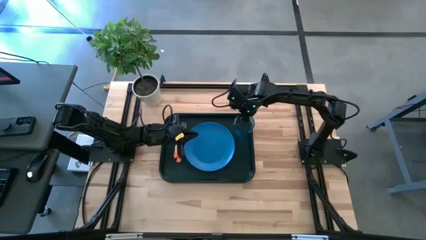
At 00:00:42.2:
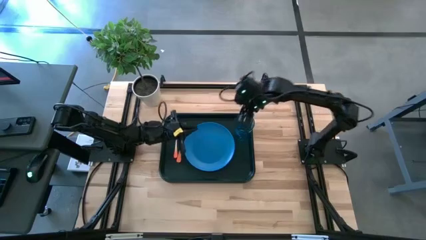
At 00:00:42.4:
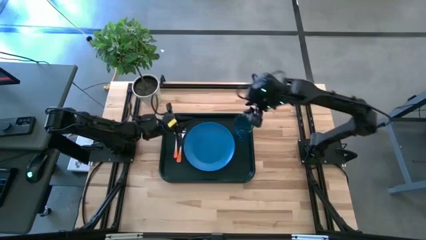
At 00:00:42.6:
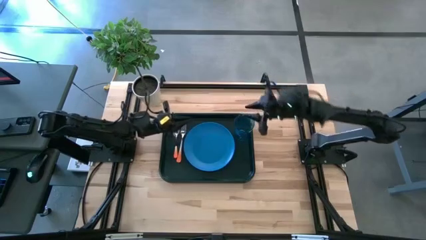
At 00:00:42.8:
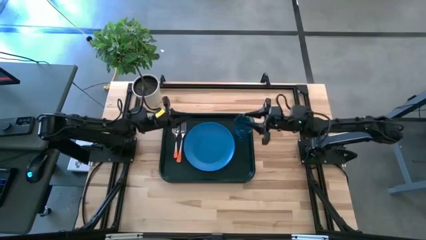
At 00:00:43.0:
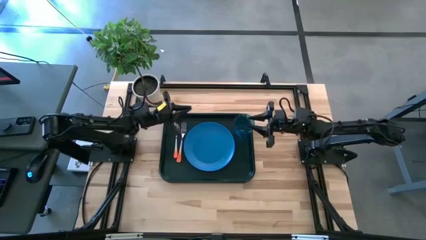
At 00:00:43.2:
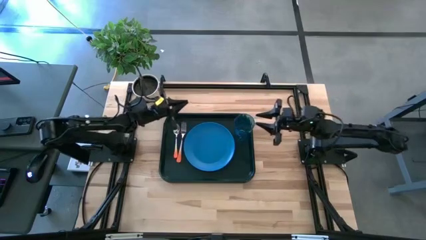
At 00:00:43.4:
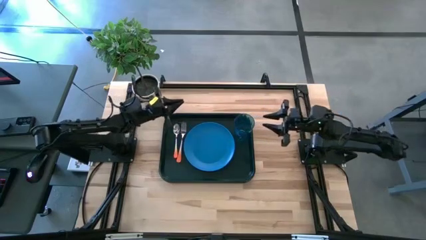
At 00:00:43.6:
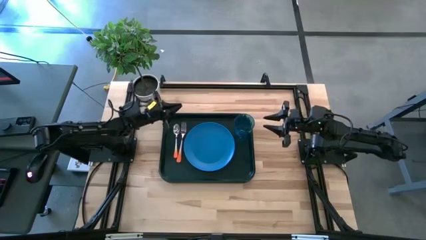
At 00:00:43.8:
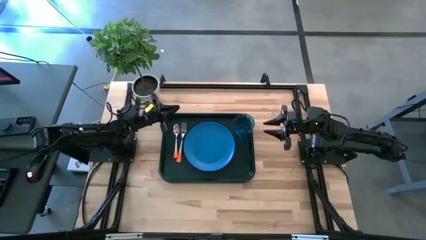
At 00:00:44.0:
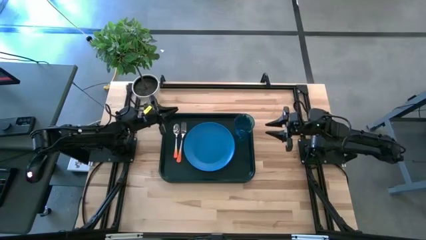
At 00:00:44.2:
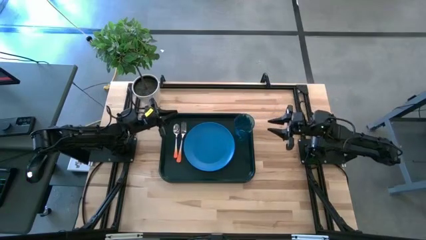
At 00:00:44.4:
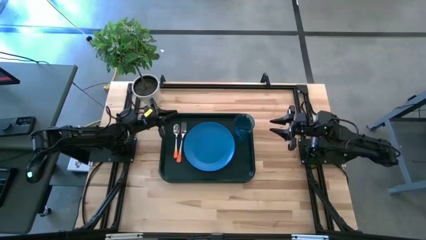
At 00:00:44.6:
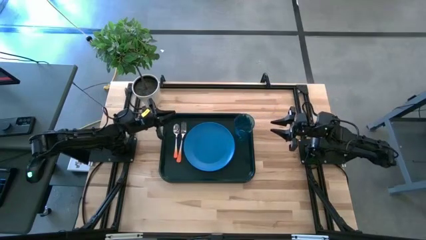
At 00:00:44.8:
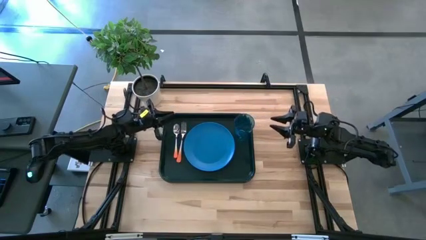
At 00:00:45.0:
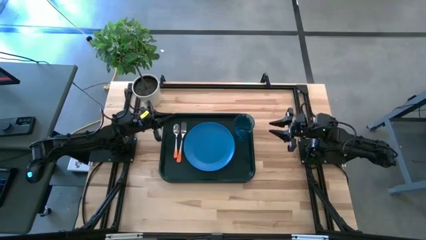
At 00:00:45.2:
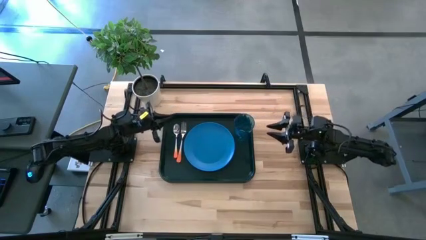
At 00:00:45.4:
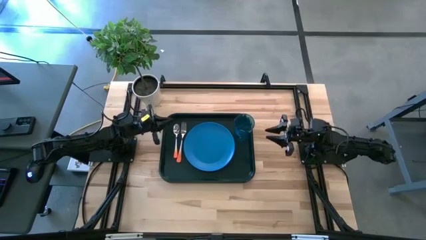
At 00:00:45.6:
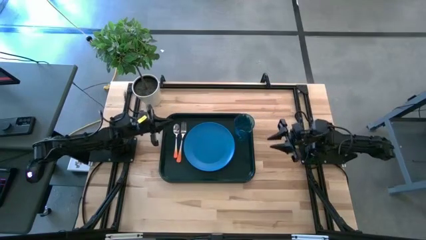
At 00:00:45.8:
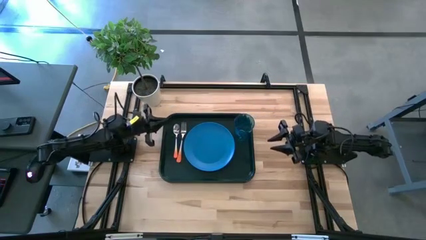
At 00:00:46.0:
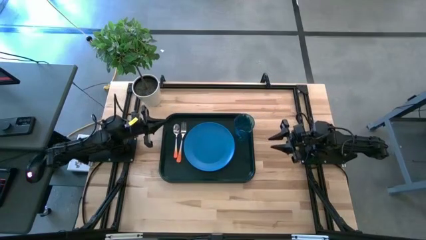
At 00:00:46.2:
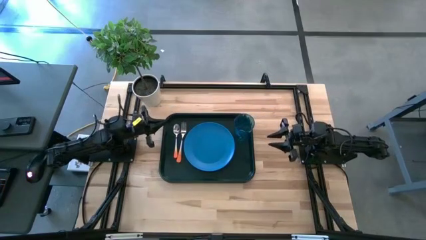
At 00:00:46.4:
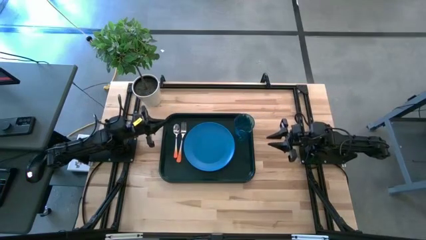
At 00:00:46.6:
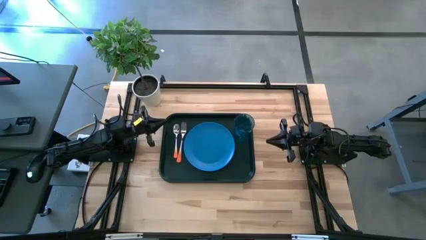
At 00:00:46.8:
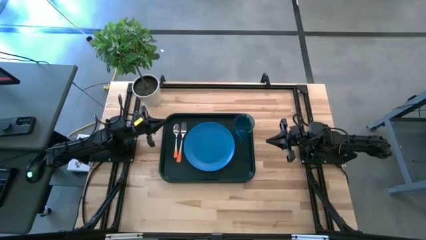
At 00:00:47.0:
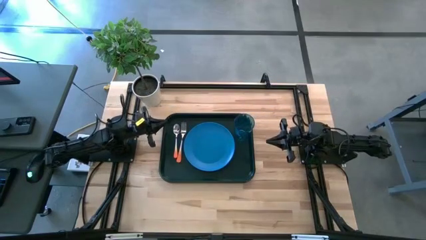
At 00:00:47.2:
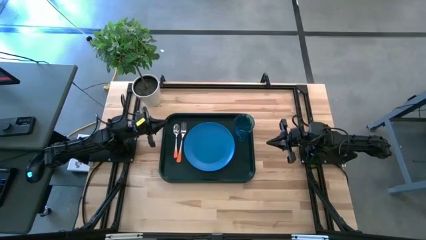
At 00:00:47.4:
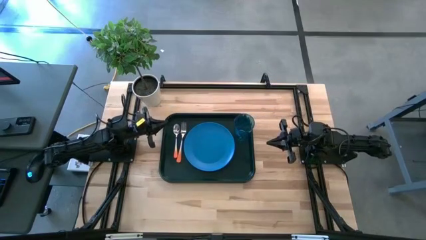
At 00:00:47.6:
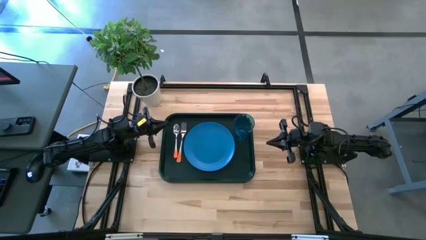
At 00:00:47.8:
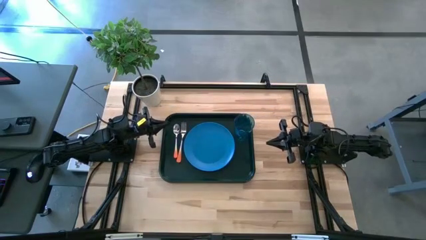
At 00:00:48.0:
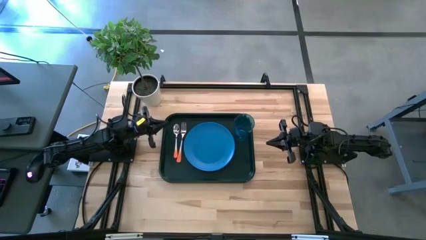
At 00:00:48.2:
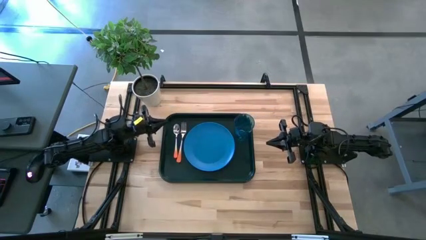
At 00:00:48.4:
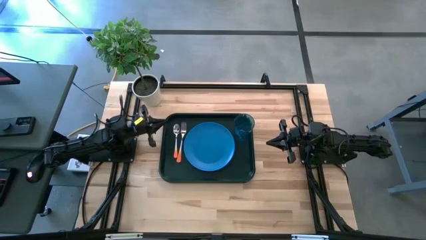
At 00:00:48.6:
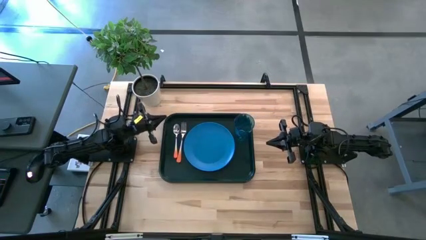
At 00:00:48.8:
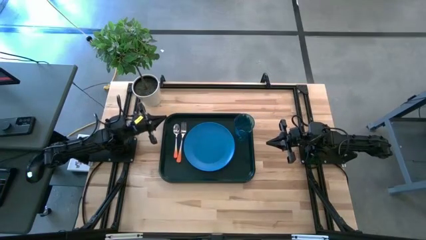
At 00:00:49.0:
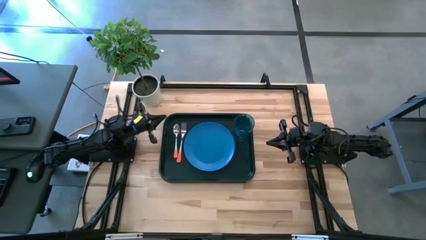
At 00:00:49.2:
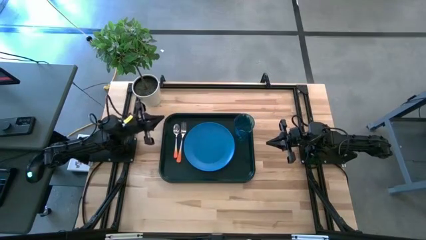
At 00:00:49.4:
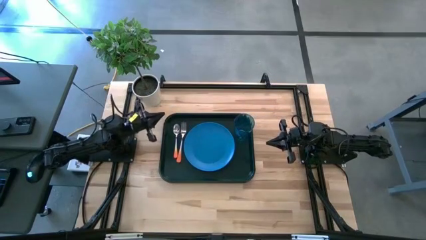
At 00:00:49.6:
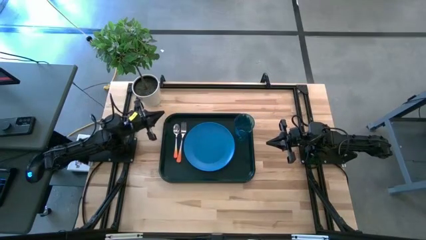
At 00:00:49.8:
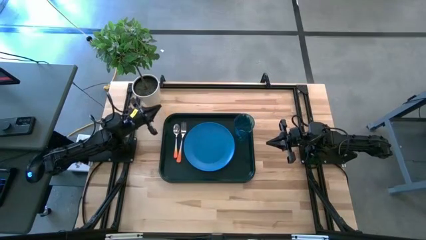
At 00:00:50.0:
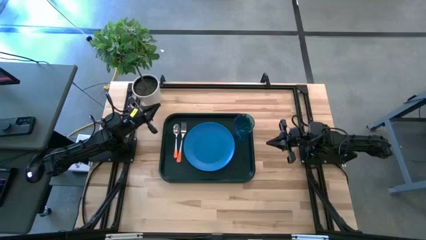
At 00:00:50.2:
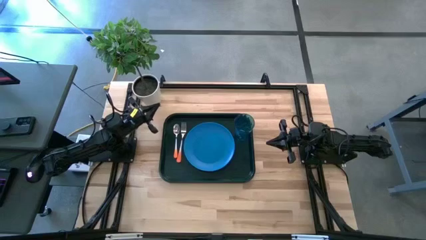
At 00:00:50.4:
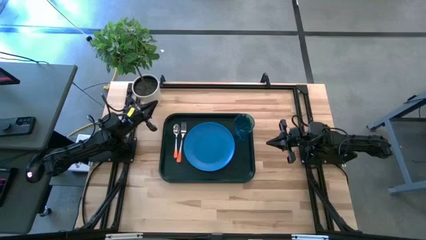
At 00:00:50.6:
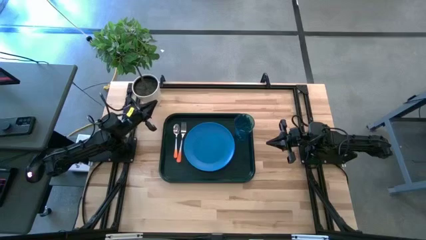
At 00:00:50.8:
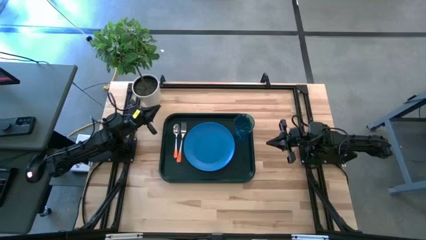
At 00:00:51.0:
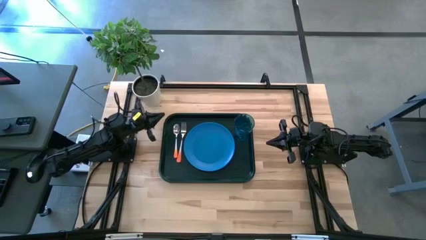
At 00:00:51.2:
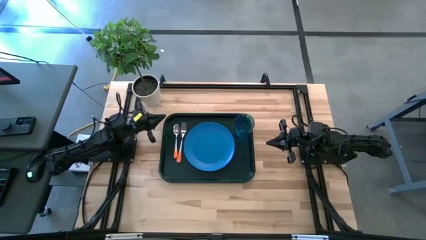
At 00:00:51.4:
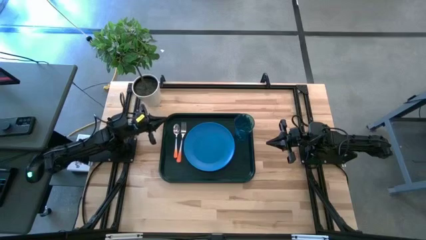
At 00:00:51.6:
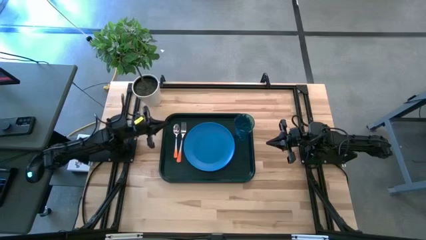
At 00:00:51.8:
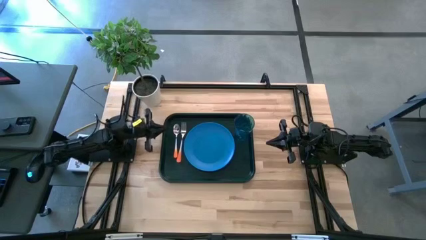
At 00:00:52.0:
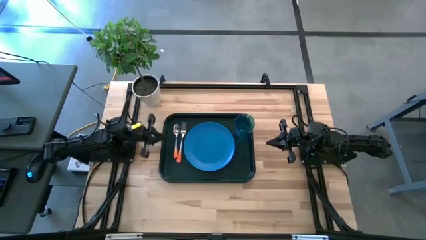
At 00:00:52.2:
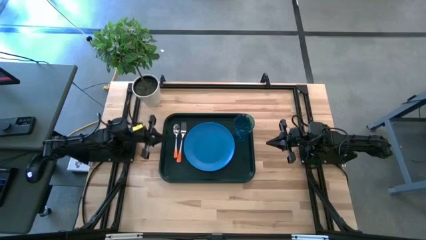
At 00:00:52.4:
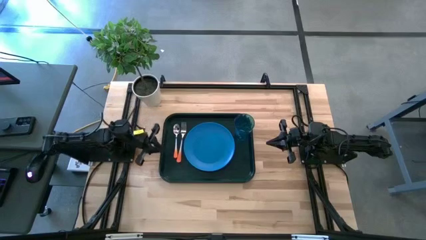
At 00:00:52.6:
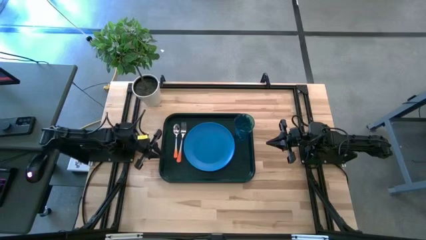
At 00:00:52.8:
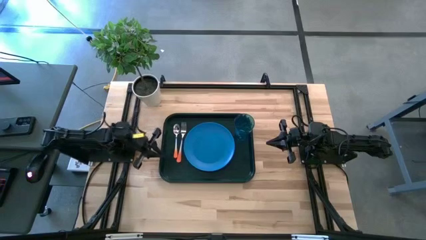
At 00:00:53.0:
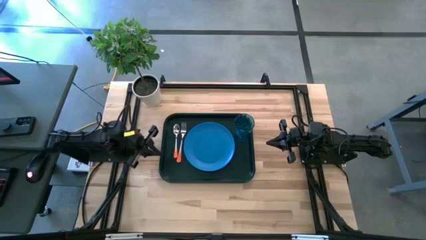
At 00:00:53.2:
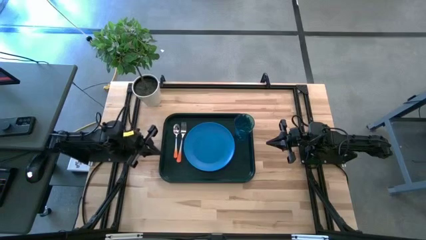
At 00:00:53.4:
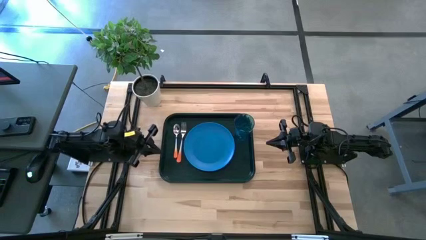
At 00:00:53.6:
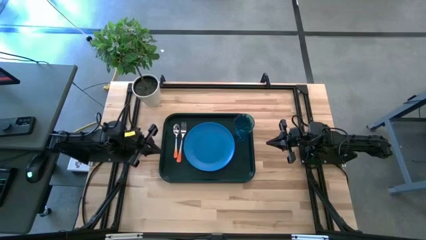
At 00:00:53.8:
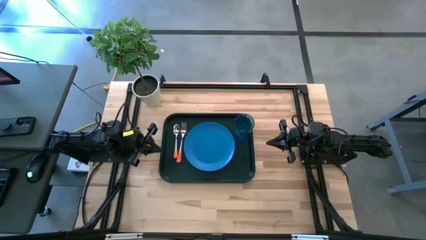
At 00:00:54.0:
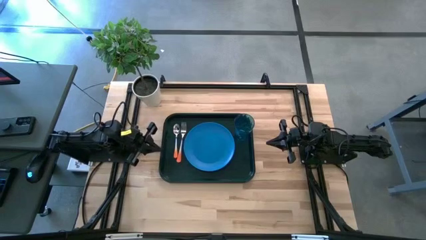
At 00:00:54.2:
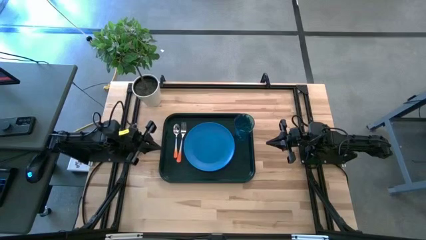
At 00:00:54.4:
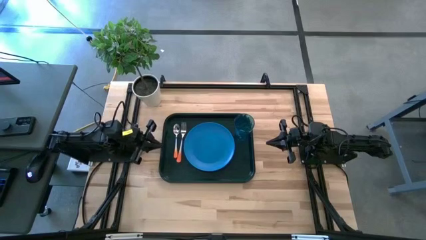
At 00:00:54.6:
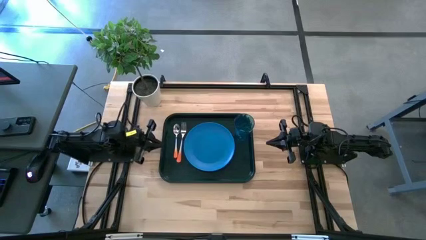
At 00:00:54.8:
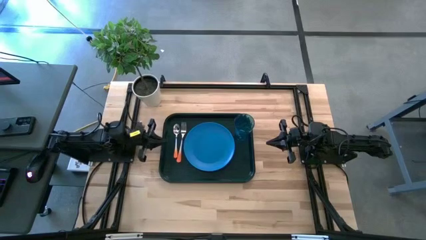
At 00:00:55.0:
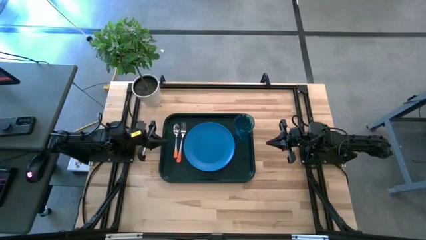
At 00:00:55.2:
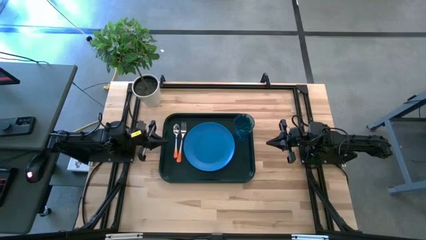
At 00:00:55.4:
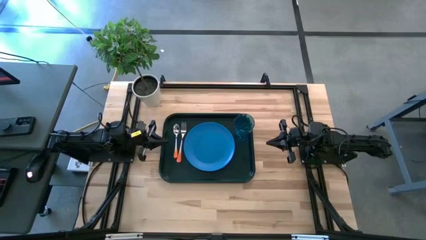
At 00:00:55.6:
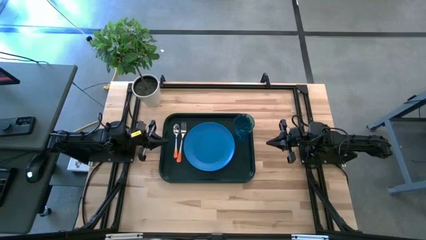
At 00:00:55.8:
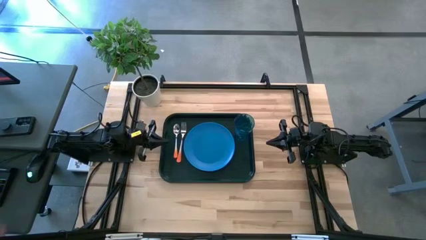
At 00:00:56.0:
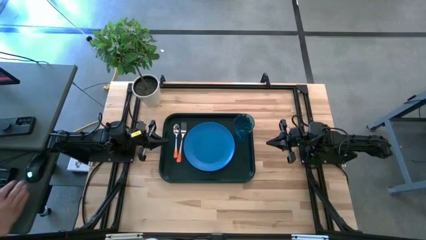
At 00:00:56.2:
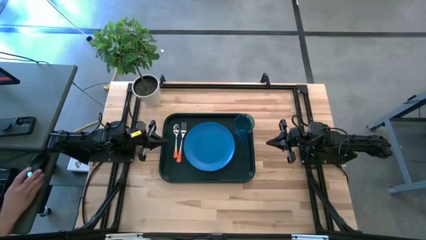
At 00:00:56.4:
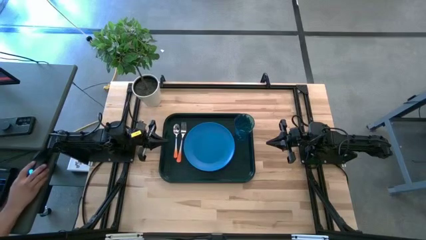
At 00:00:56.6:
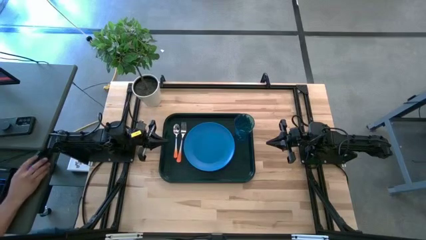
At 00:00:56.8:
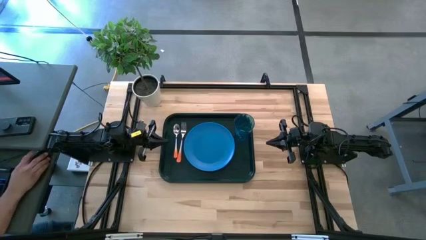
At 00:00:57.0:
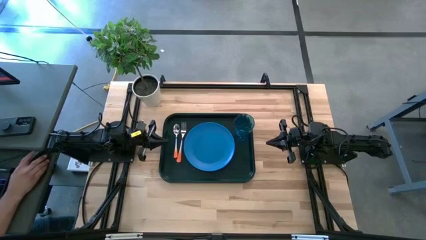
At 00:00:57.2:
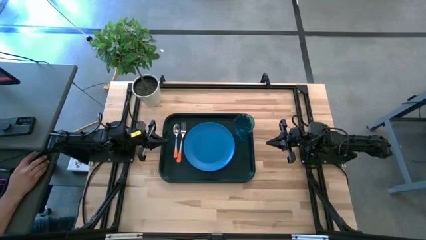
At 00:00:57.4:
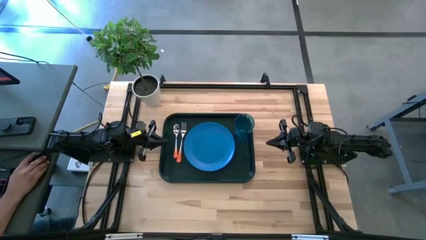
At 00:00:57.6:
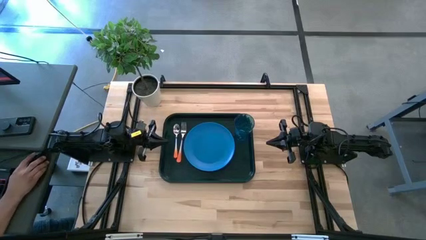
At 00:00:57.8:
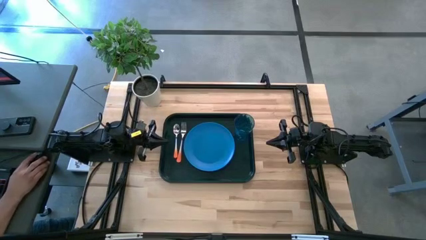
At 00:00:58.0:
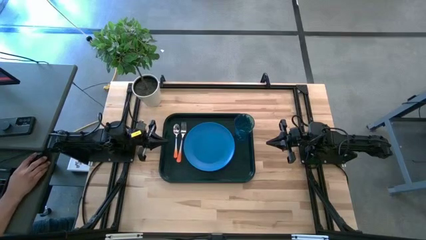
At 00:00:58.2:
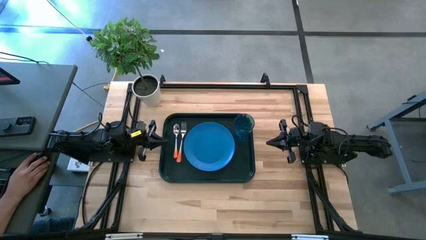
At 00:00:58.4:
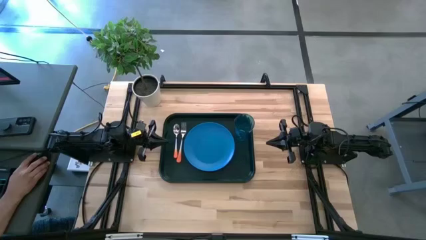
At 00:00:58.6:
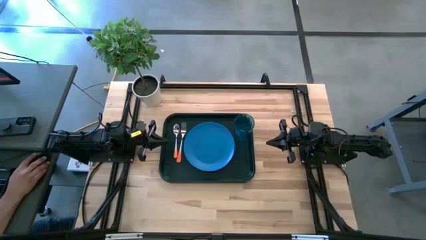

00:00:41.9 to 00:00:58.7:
Task: Pick and place plate/cup/fork/spoon on tray
Return to Home Position
